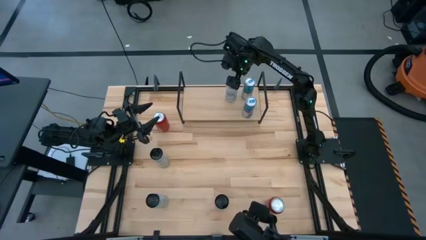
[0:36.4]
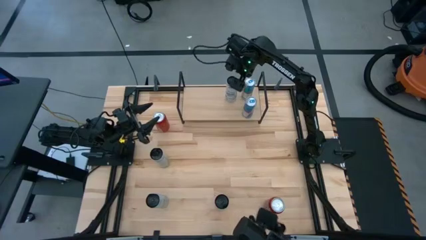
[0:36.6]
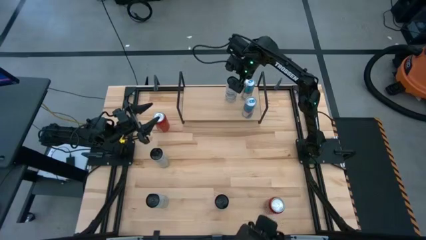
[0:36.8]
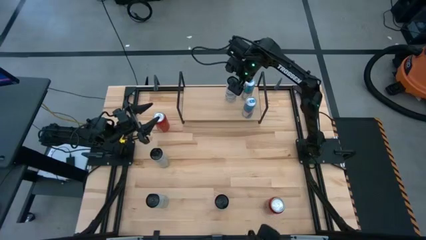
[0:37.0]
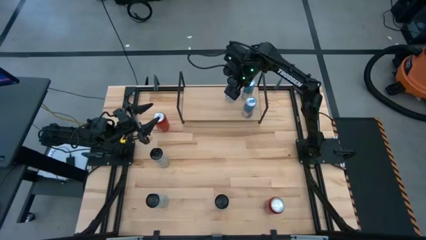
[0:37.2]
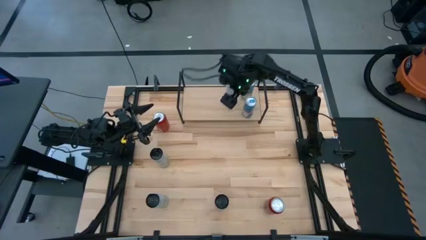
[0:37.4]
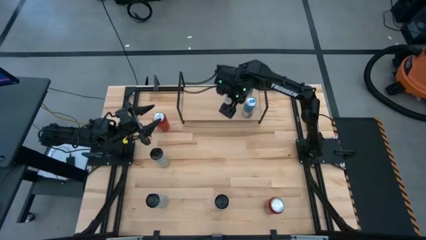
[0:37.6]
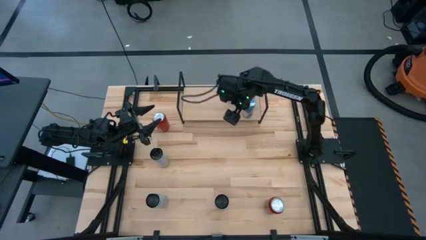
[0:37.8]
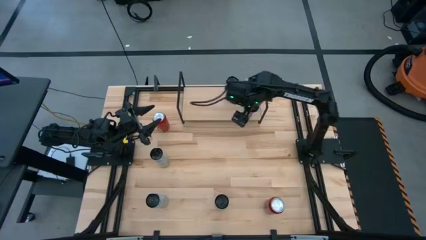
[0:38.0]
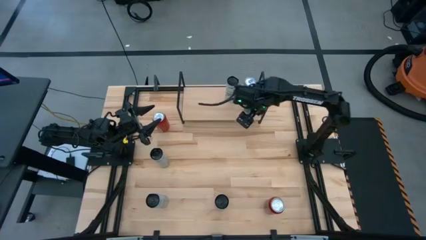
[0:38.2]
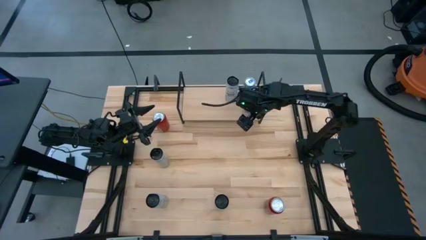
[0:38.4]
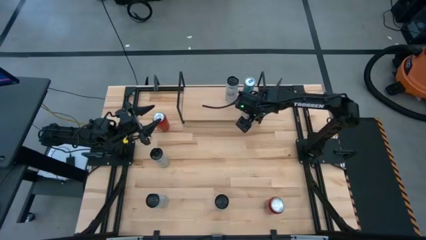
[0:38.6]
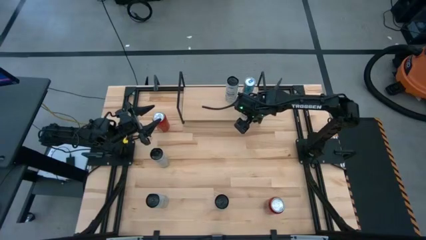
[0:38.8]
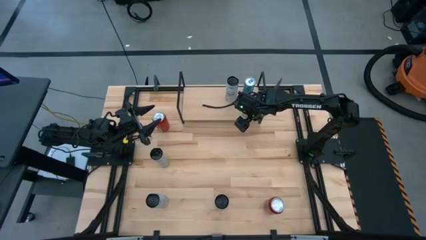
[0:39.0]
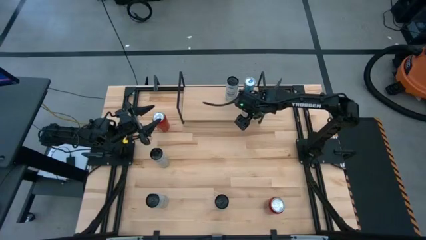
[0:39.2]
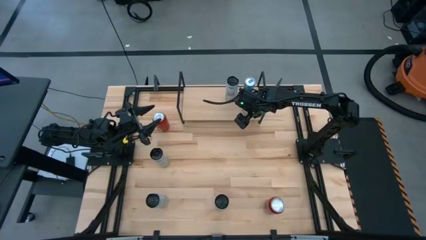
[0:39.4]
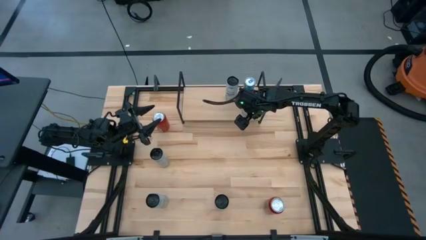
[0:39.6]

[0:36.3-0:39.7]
Task: Place canned beverage on shelf
Adjust the light blue soda can on the shelf

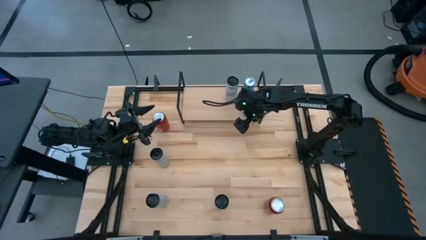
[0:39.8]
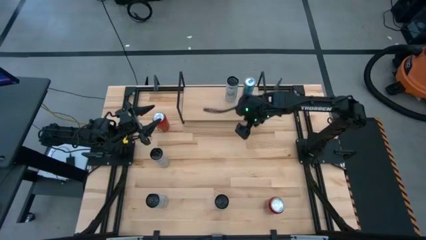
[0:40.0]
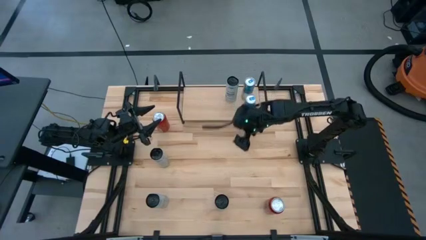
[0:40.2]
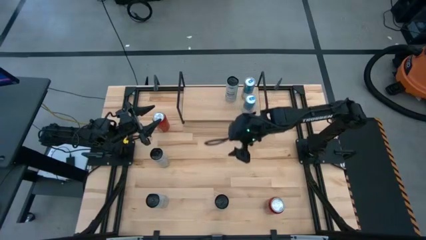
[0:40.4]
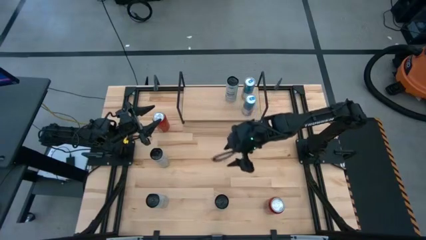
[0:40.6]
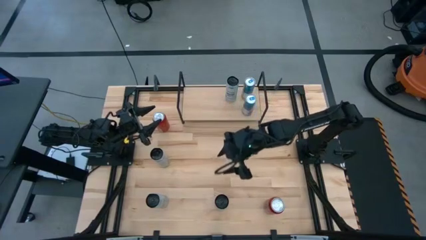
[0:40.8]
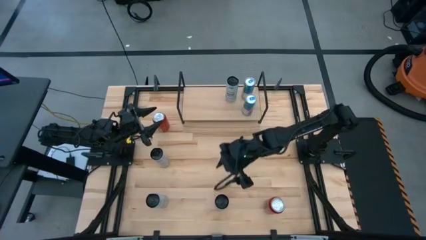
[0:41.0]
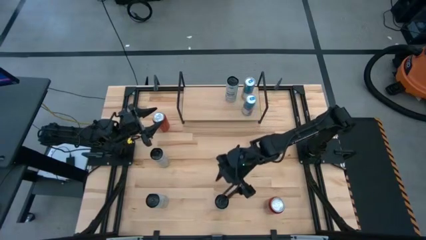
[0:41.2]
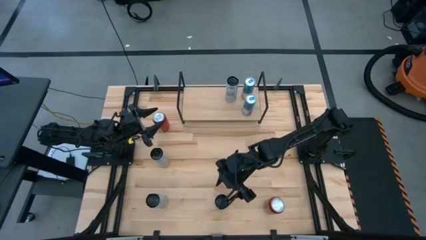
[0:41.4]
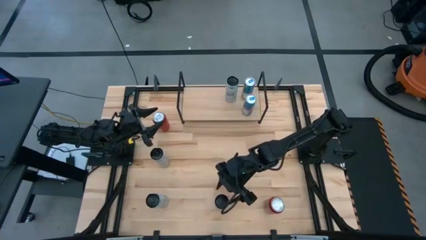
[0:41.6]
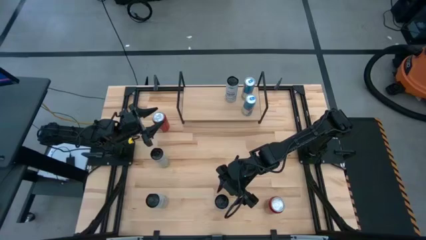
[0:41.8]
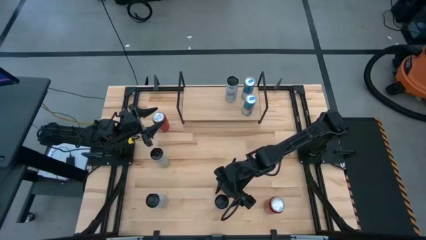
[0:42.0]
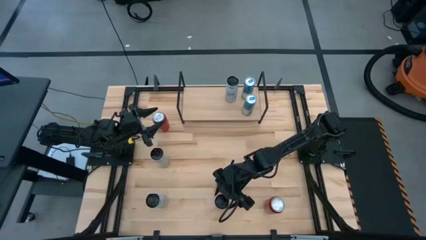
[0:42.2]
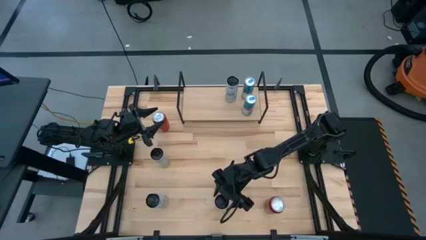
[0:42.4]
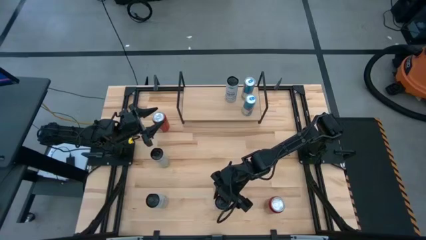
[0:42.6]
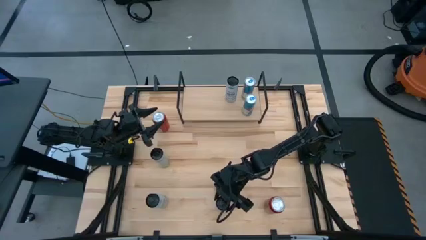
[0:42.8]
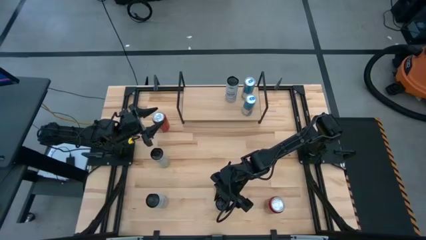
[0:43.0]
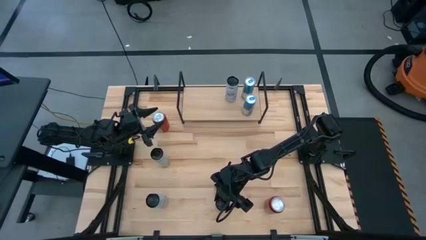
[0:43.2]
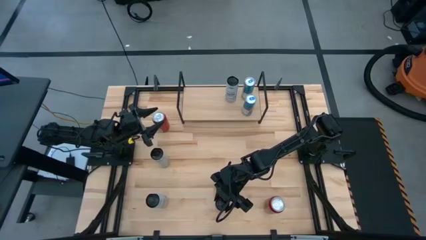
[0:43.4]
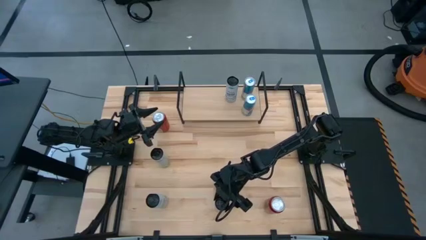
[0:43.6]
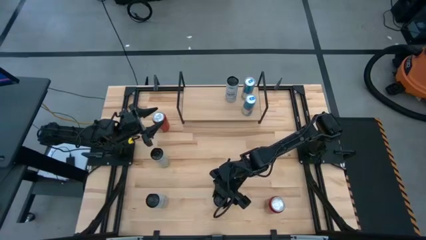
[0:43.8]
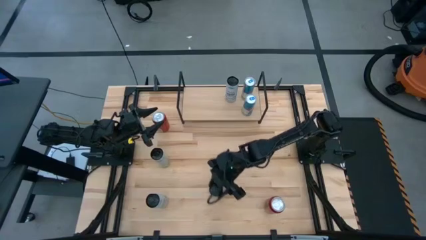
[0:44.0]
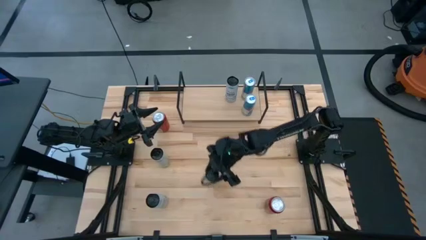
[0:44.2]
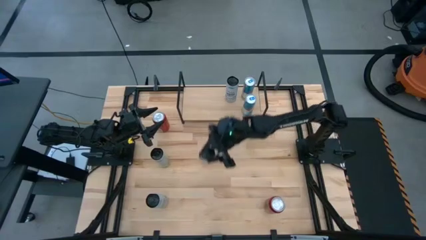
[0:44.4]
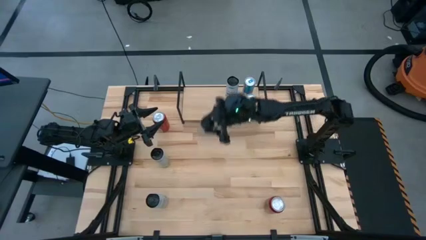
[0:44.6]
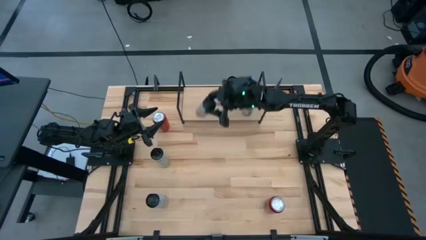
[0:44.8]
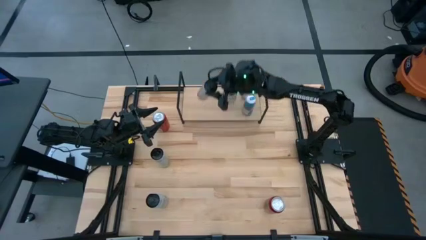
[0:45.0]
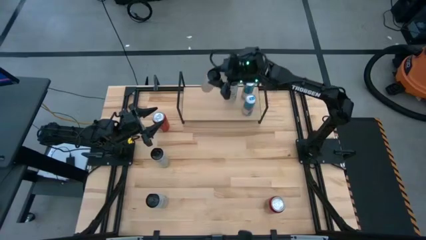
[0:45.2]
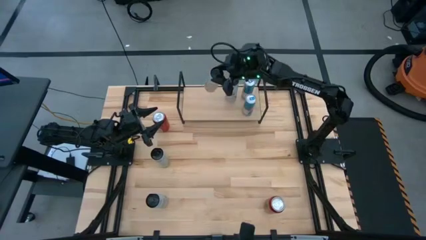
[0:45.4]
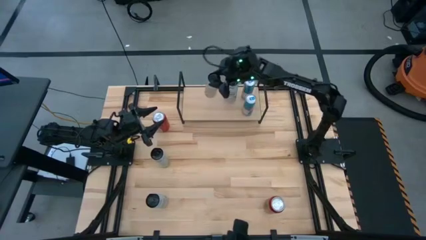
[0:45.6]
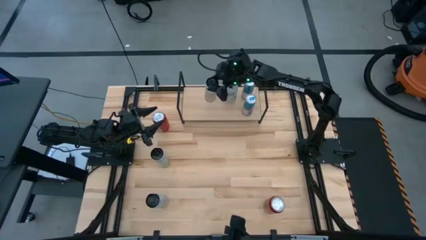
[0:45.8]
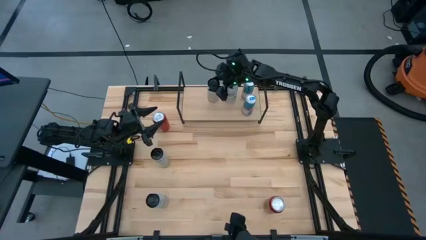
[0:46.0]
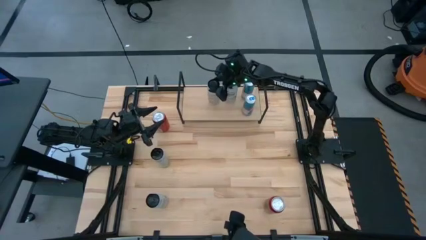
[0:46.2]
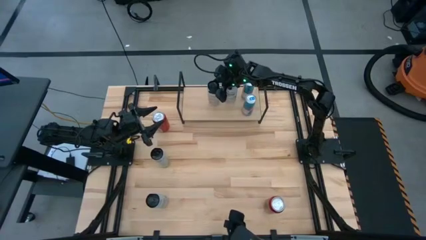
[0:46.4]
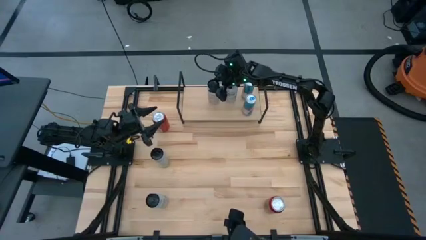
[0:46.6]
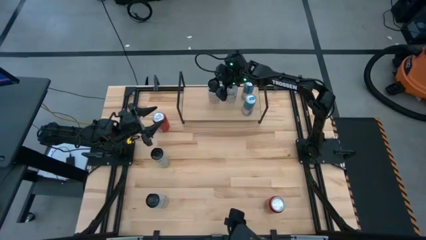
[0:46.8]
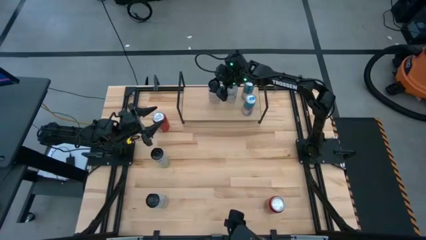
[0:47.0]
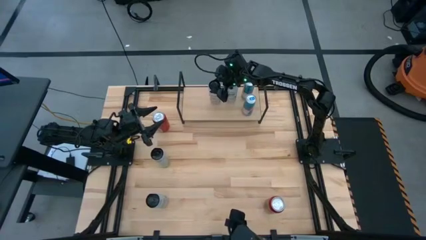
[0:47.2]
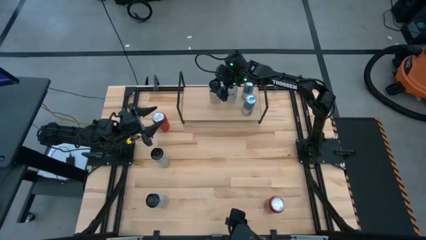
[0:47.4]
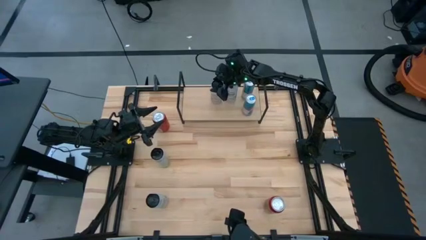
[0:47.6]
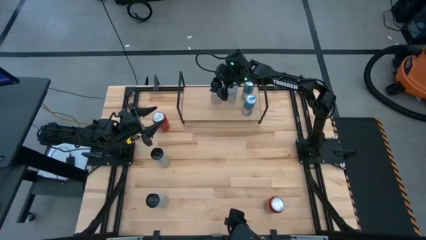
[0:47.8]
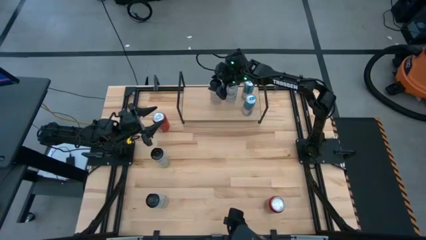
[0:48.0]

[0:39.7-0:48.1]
Put the bottom center black soda can on the shelf aligned with the other black soda can
